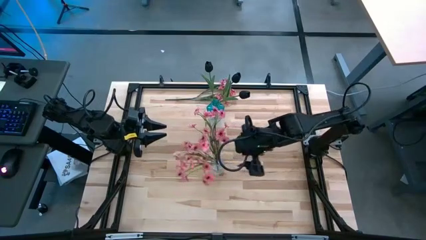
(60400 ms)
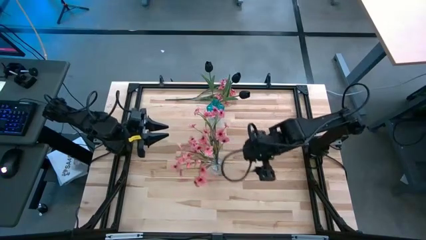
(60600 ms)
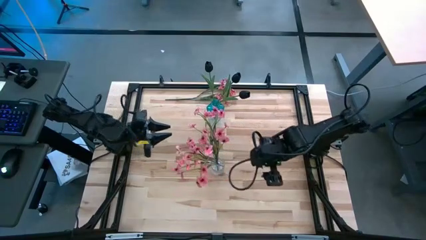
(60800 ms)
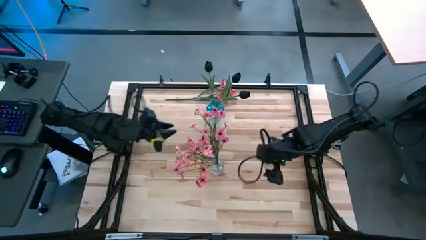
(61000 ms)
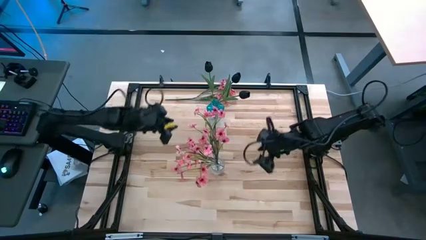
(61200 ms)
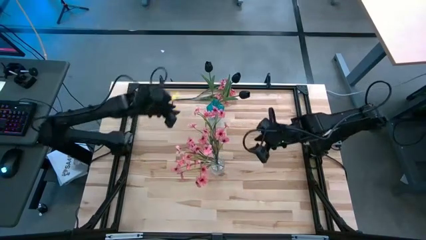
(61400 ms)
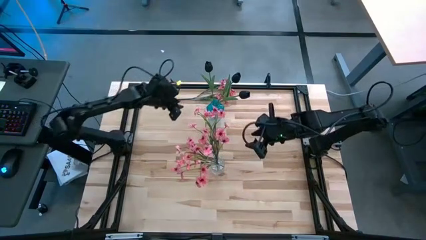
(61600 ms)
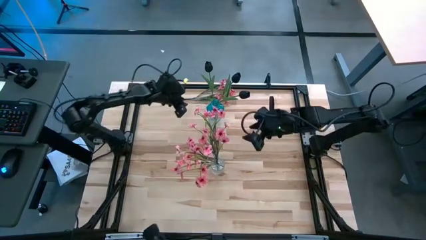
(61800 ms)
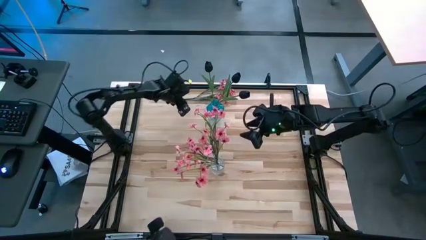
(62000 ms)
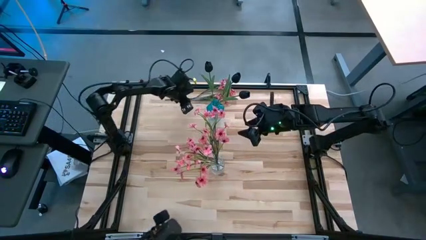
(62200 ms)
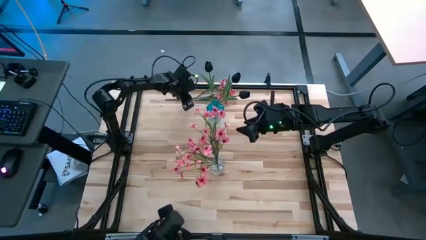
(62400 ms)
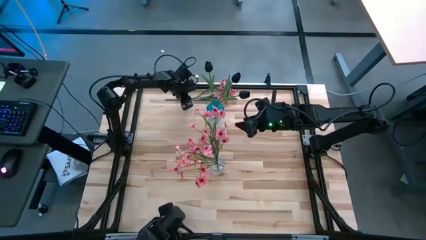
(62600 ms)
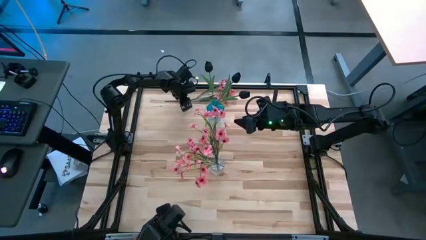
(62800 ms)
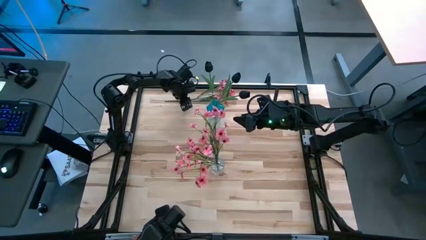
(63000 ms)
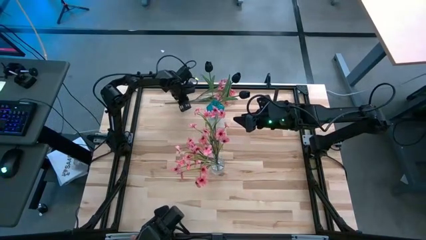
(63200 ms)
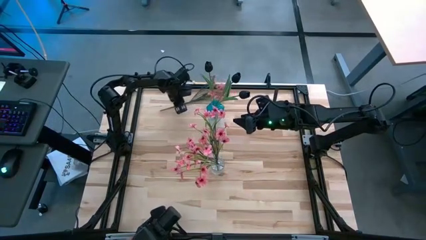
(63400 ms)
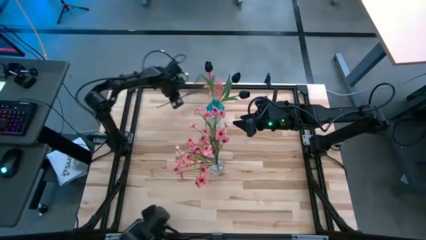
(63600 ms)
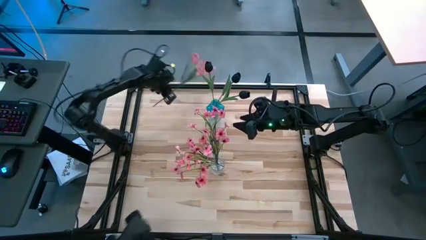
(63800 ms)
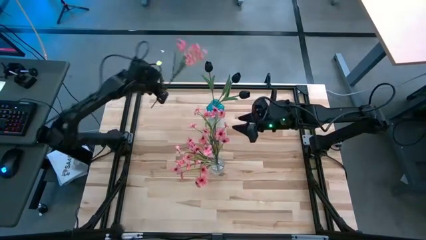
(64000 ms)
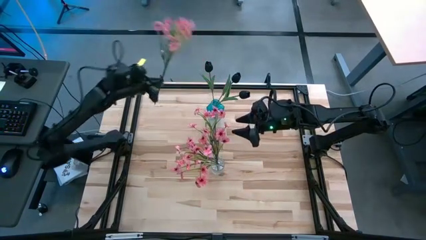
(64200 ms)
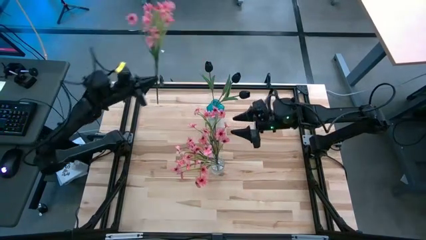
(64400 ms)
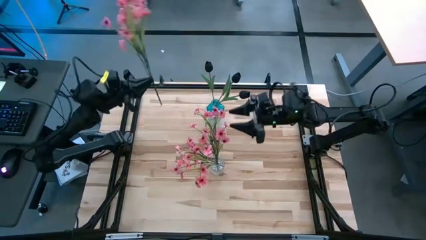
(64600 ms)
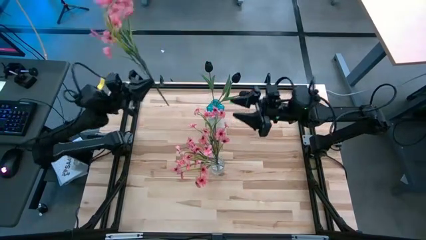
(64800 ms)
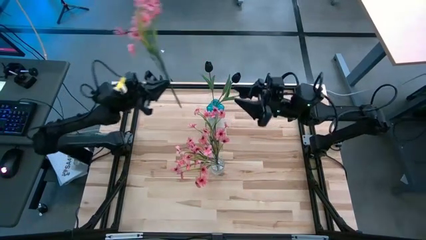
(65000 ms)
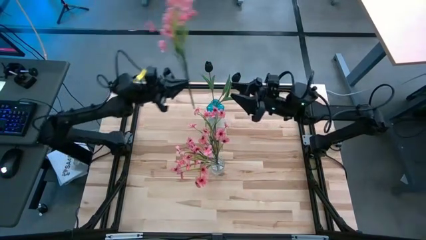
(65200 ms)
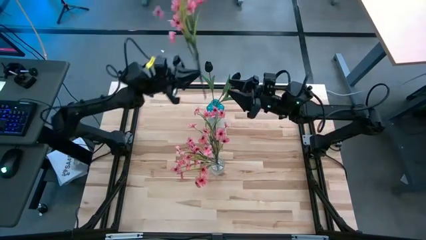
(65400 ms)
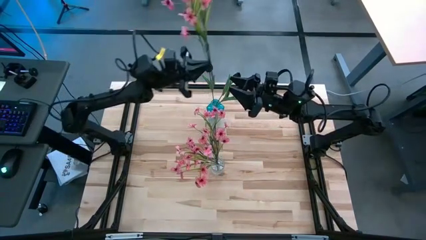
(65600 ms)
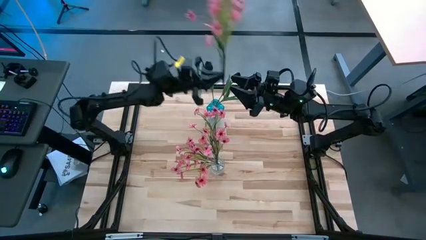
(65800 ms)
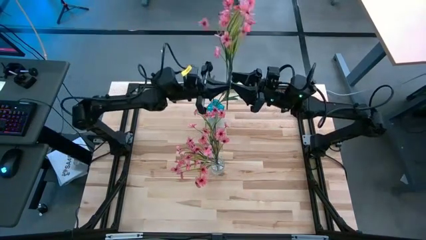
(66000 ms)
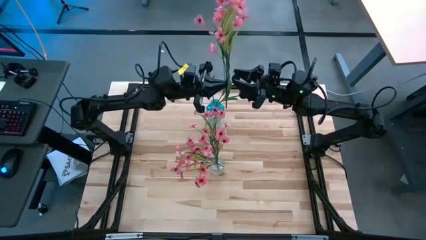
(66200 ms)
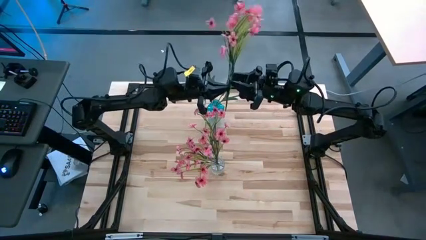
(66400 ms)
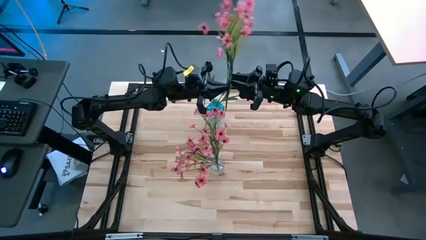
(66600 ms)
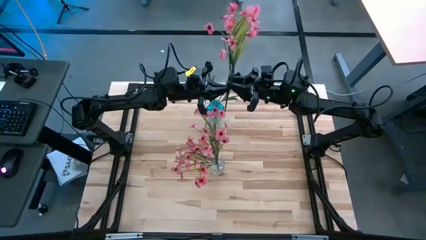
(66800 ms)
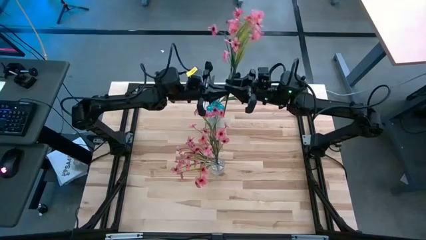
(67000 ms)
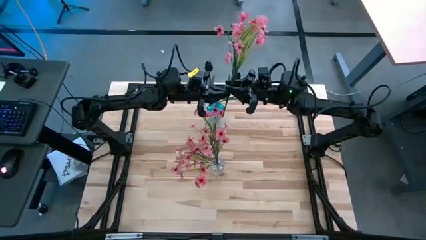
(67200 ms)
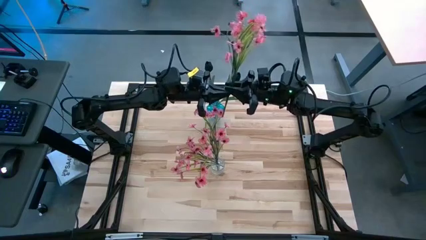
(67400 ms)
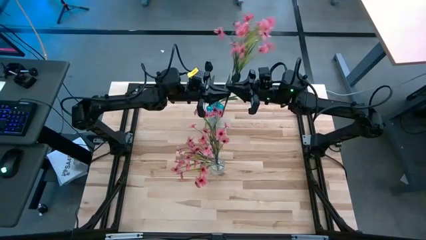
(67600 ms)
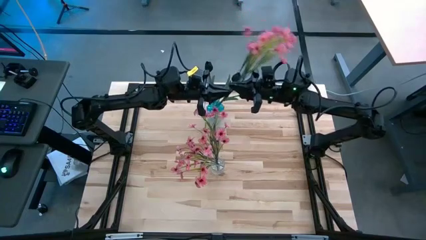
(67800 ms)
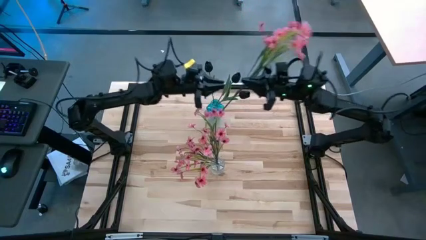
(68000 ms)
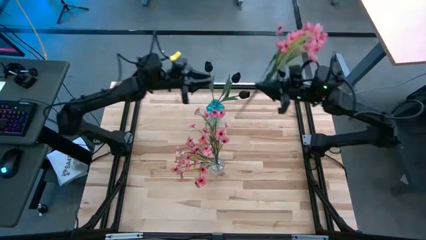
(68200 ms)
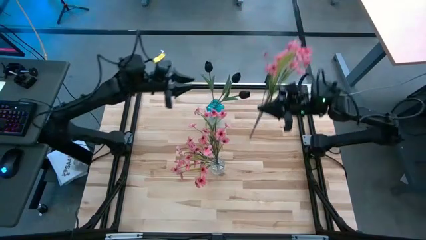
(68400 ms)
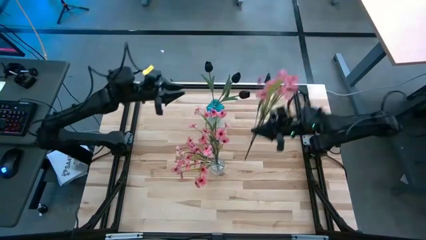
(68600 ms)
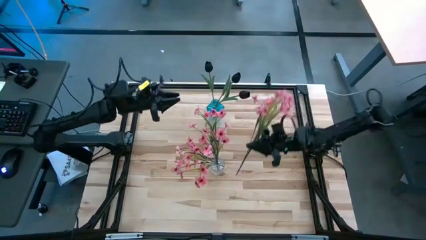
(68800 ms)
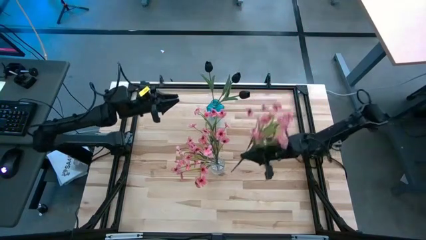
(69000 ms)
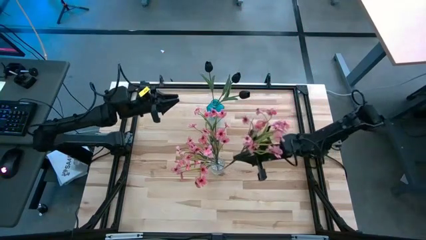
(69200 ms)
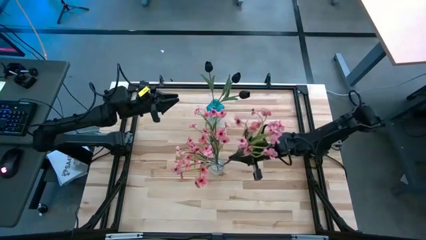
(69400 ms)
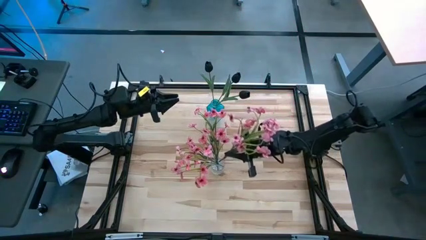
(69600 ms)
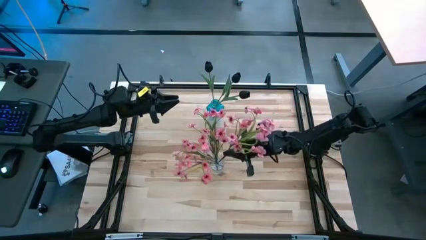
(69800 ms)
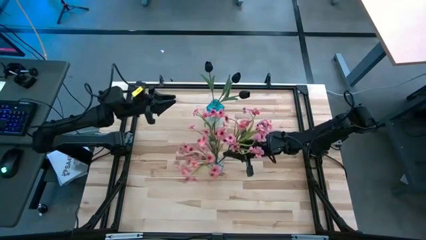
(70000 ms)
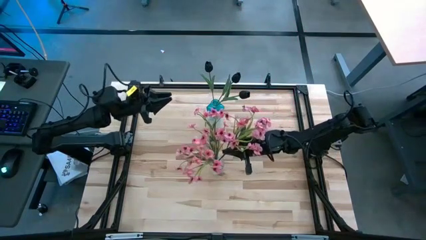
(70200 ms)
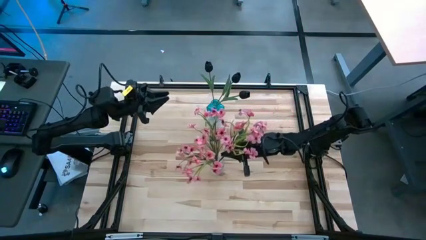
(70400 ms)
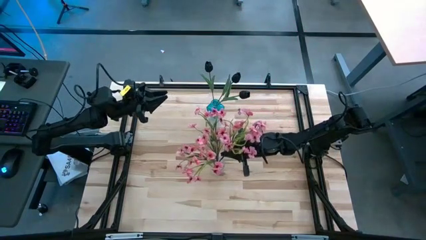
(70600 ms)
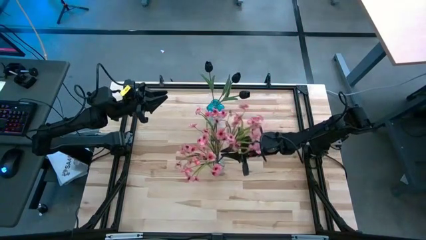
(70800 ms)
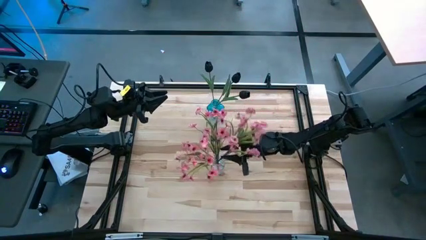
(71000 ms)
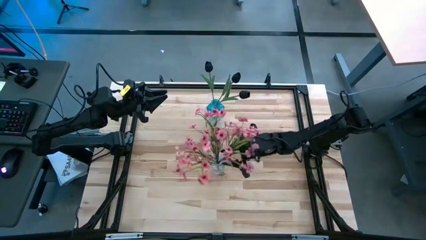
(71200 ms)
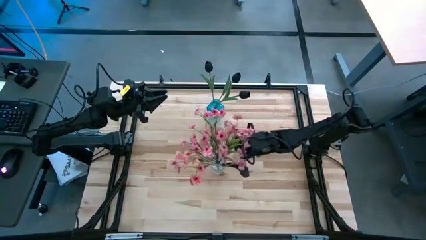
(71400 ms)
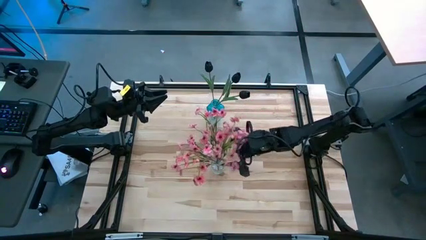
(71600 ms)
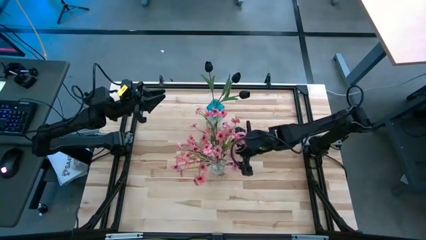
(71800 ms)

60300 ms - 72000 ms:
Task: Sort flowers into vase by color
Put the pink flower into the transparent vase
